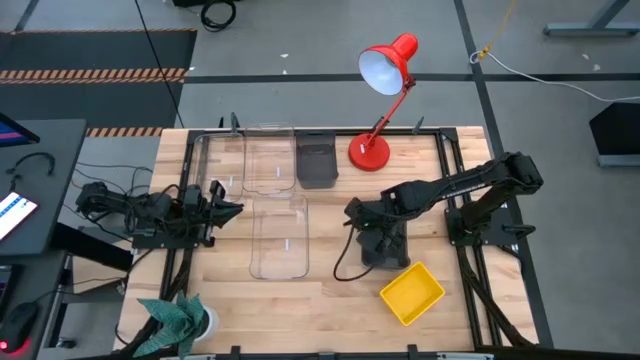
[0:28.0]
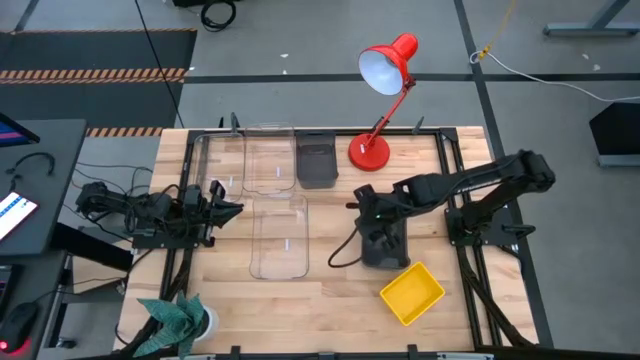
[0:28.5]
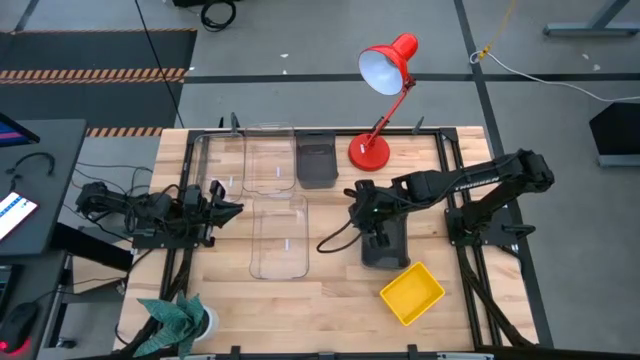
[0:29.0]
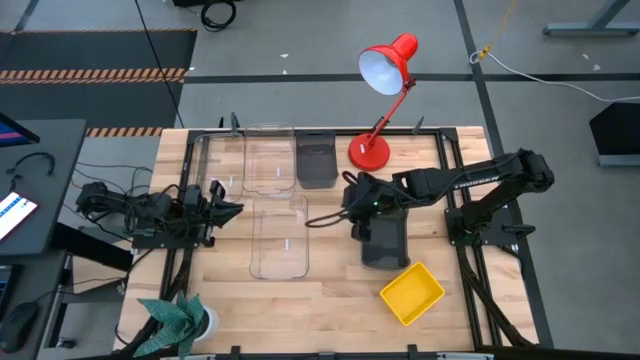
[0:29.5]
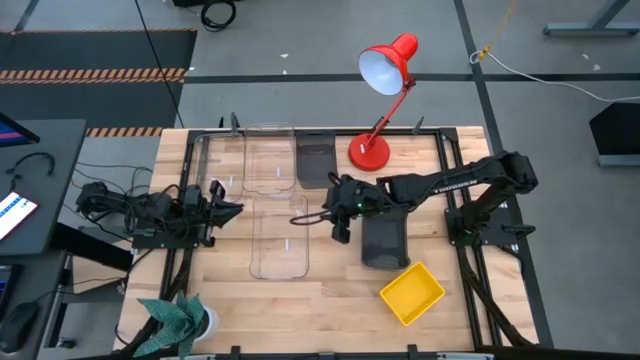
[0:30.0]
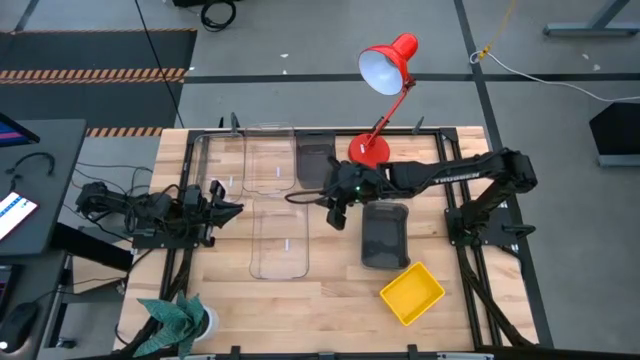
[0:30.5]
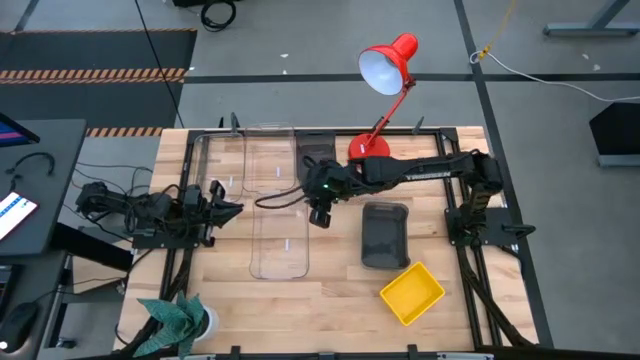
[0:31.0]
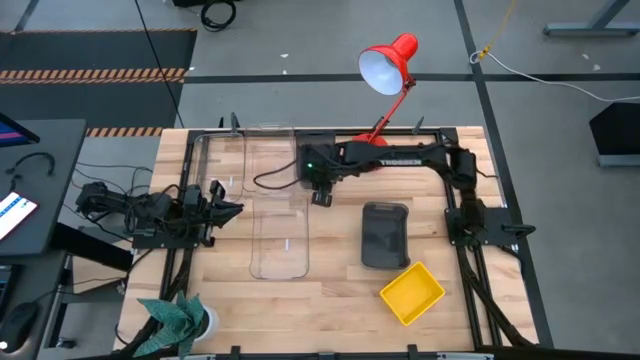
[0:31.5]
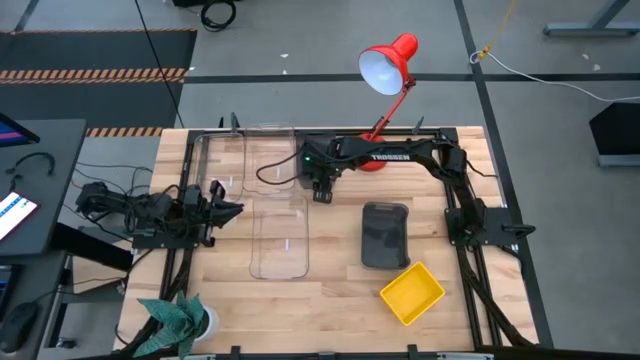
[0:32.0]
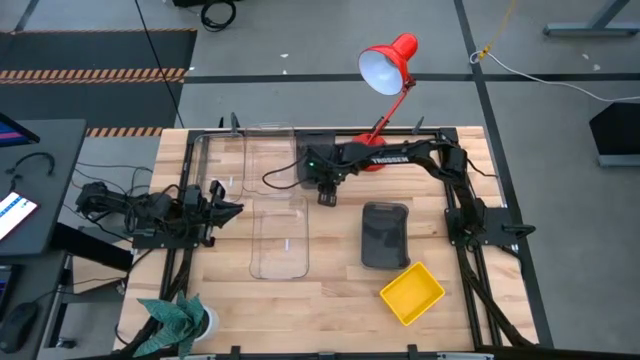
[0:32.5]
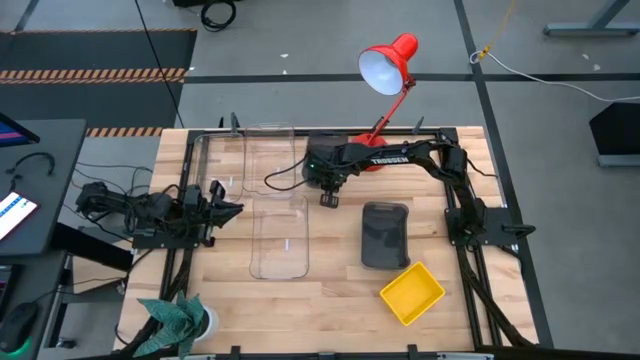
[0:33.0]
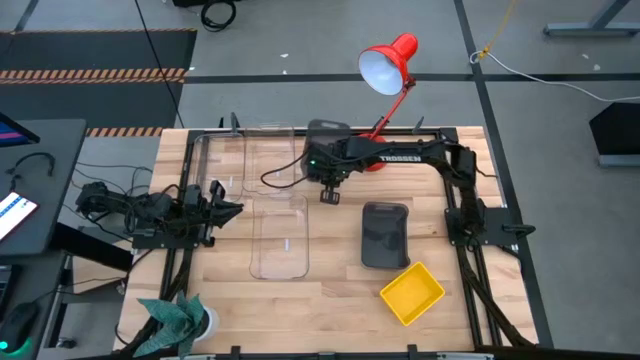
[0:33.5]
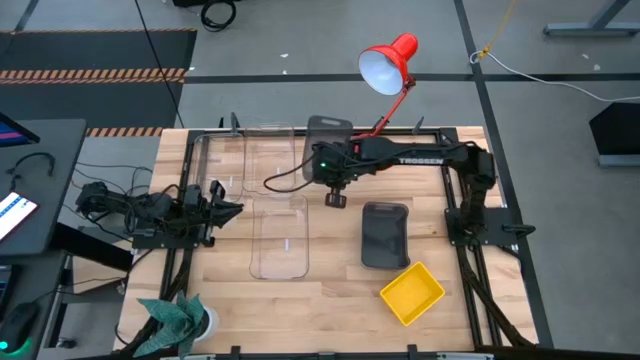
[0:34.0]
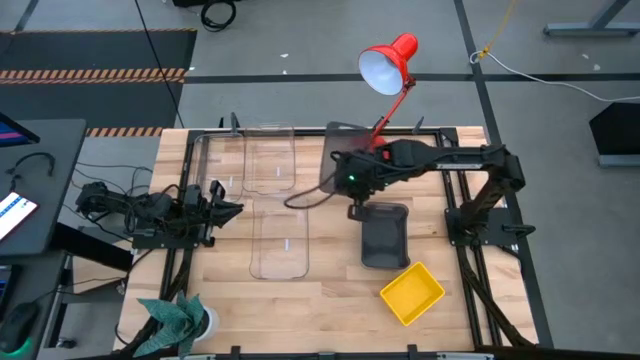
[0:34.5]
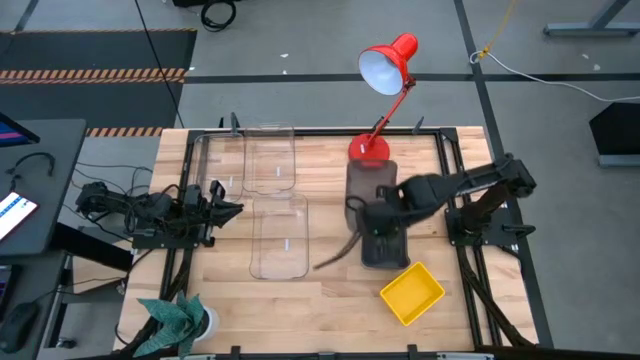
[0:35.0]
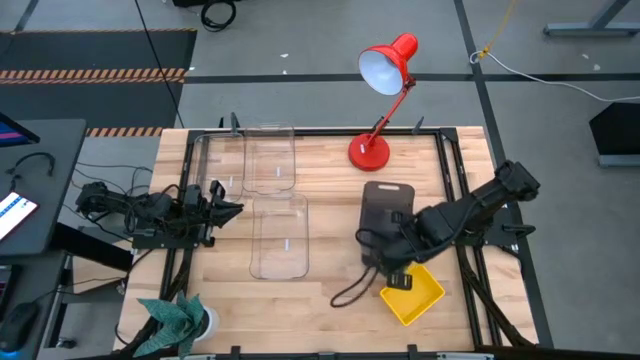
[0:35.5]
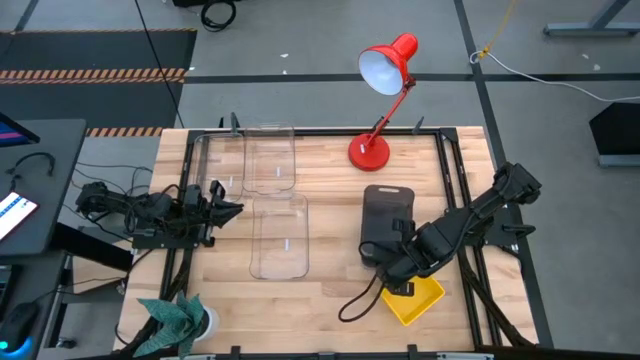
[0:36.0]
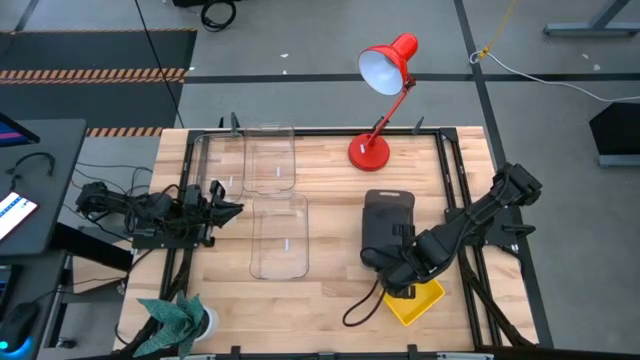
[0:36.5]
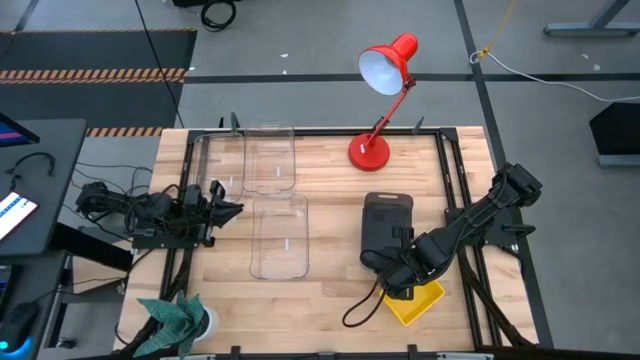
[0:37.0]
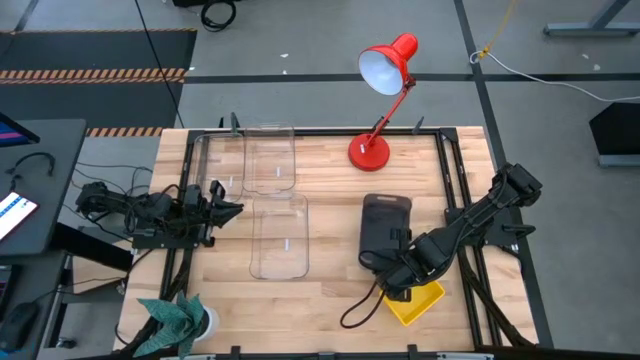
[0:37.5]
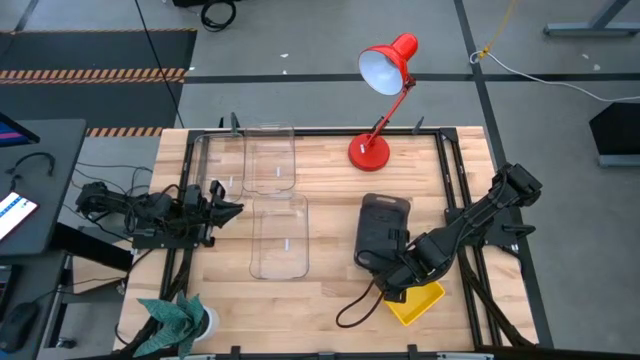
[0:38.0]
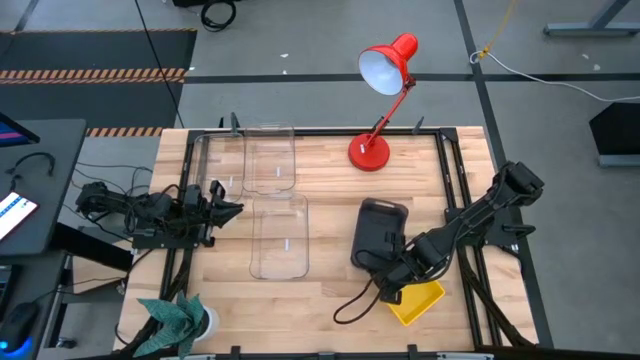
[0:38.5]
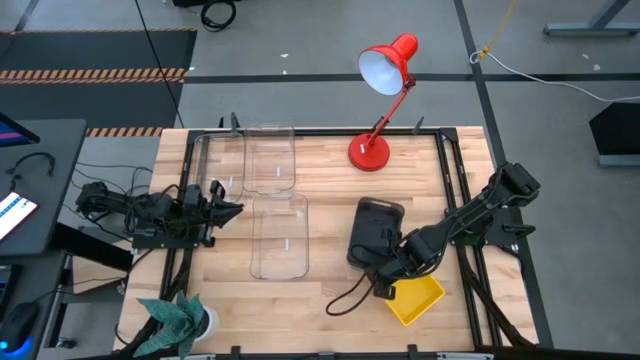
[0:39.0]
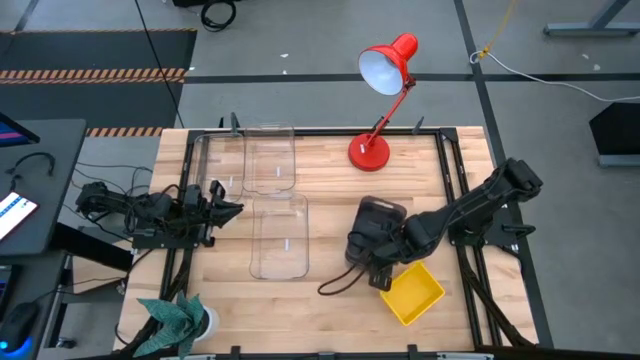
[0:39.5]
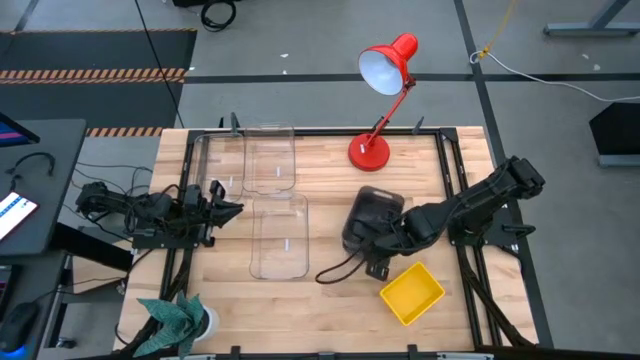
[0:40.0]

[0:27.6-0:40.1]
Stack the top black bin on top of the bottom black bins

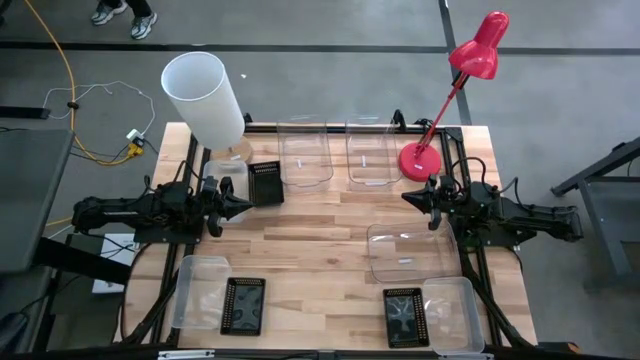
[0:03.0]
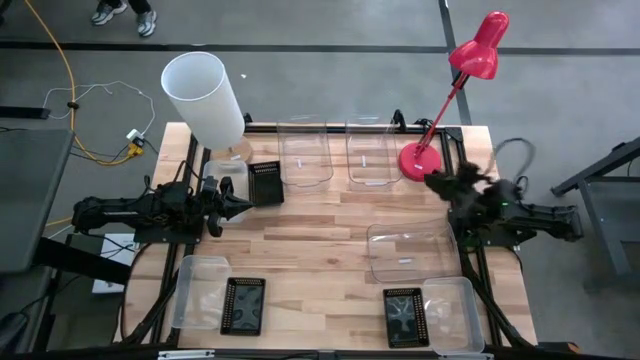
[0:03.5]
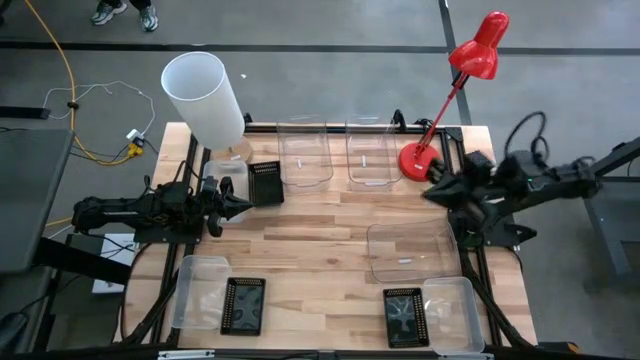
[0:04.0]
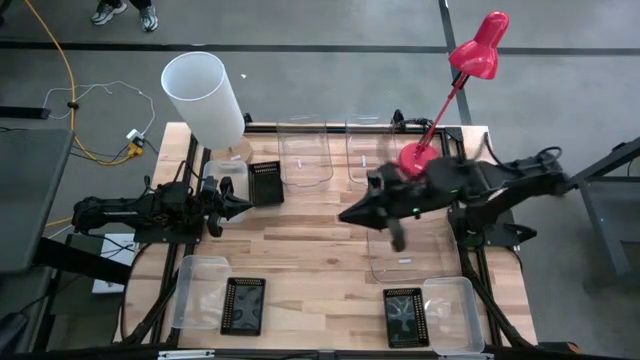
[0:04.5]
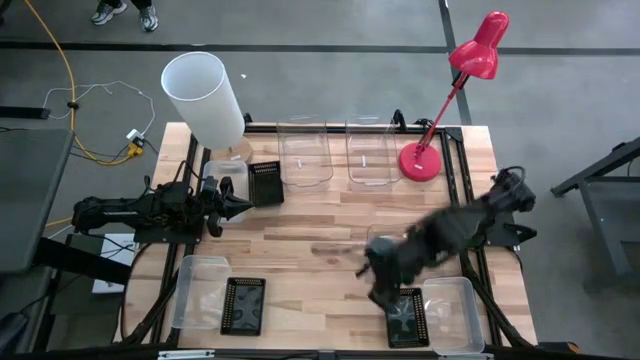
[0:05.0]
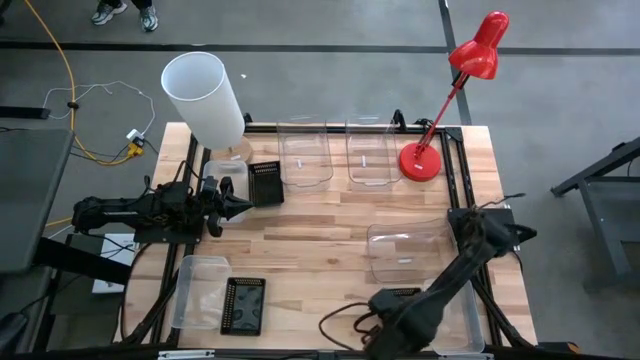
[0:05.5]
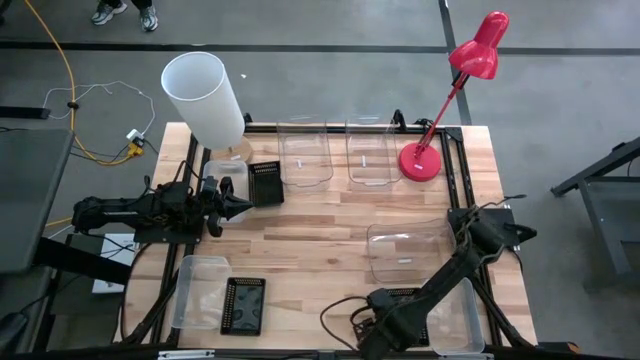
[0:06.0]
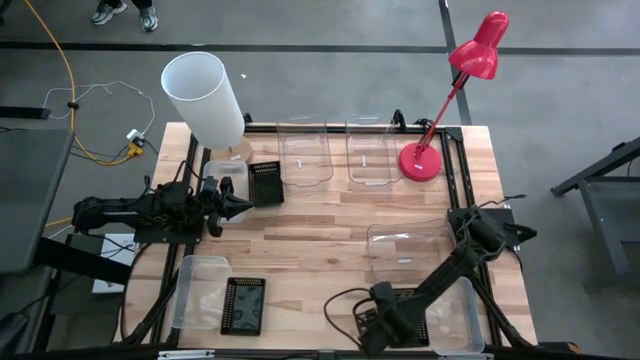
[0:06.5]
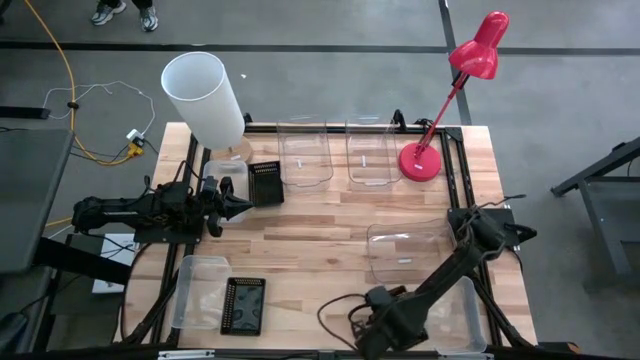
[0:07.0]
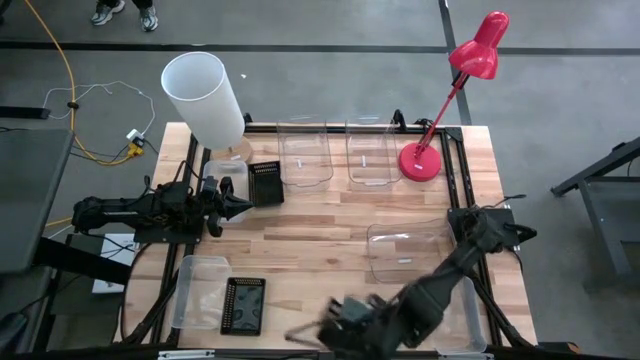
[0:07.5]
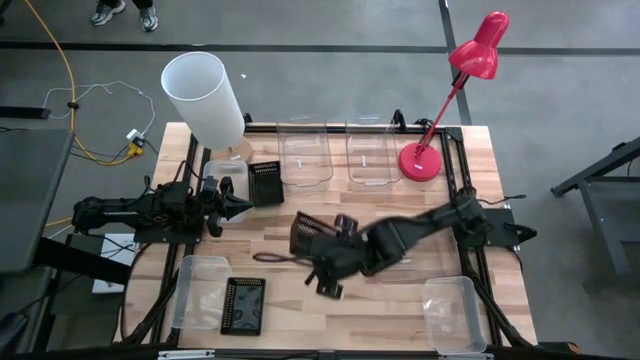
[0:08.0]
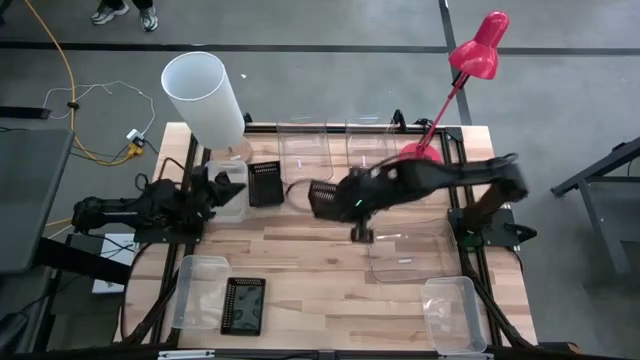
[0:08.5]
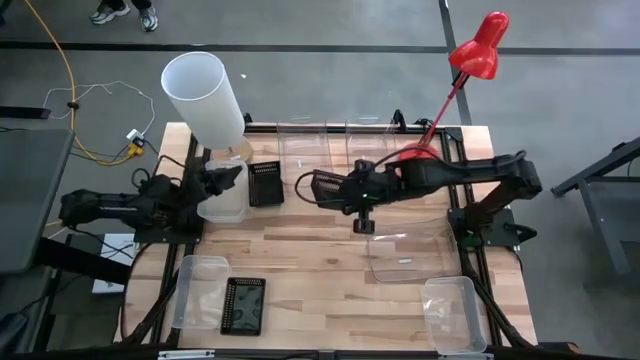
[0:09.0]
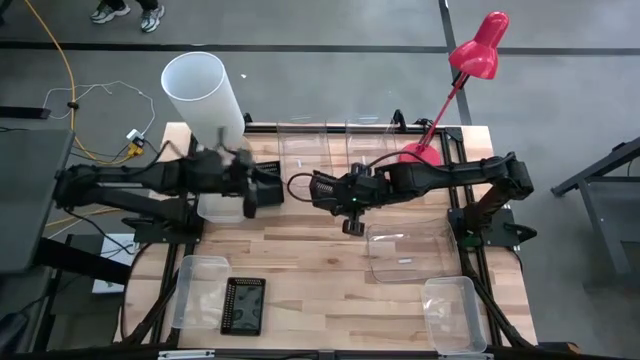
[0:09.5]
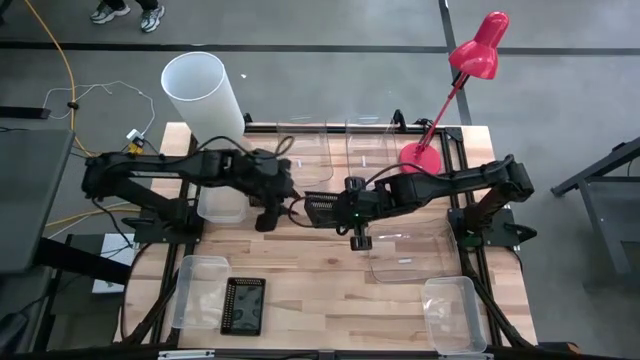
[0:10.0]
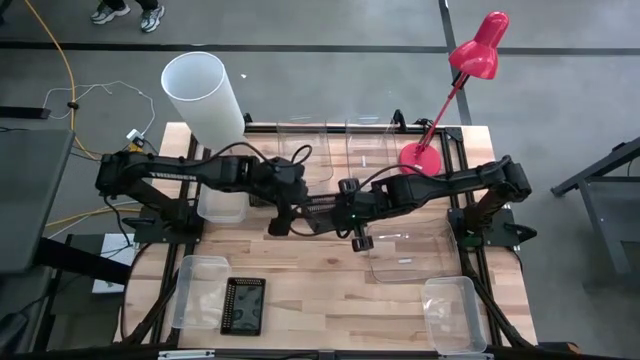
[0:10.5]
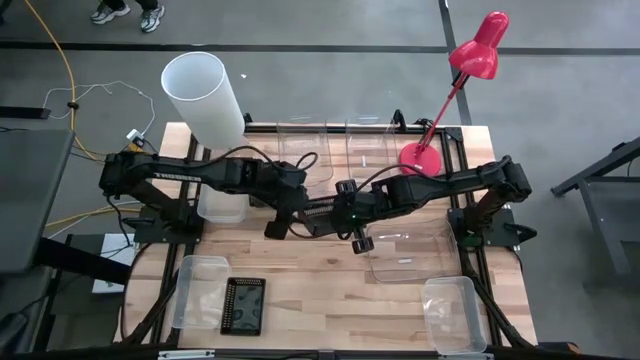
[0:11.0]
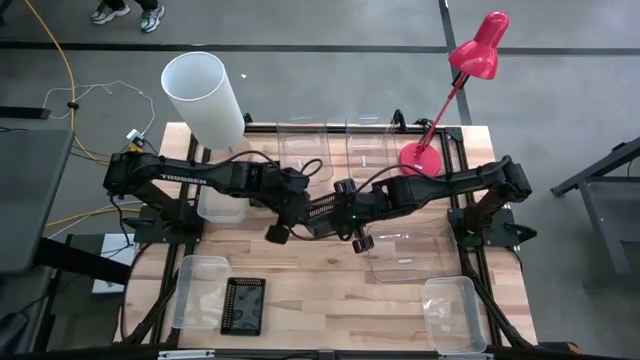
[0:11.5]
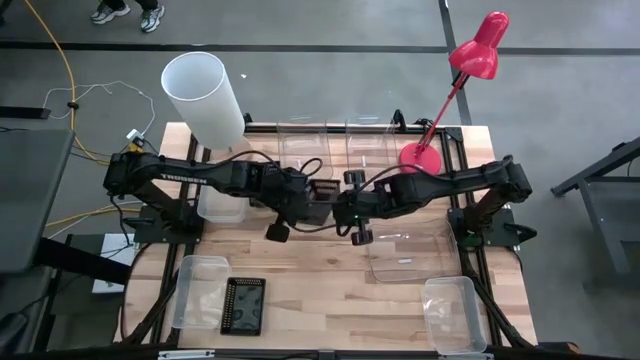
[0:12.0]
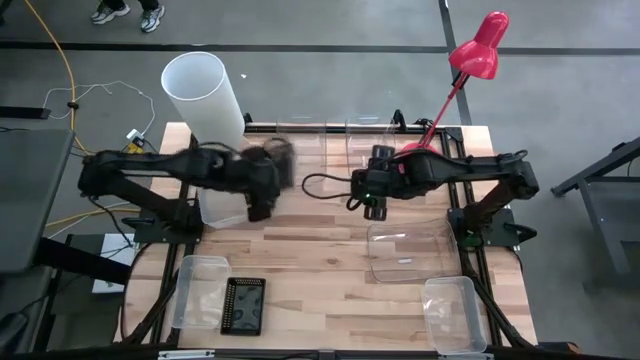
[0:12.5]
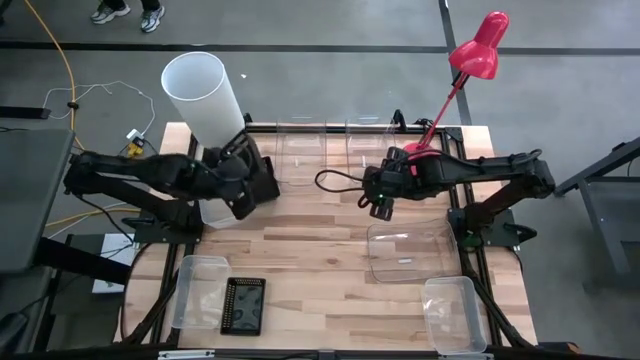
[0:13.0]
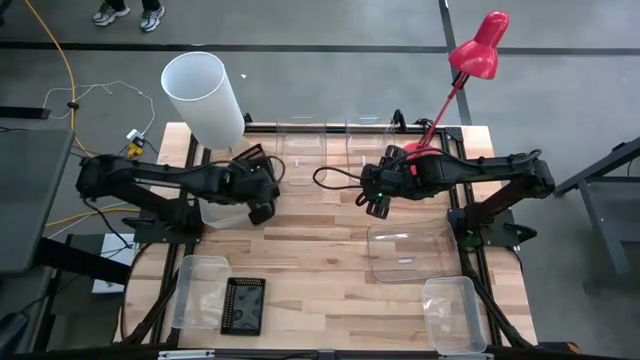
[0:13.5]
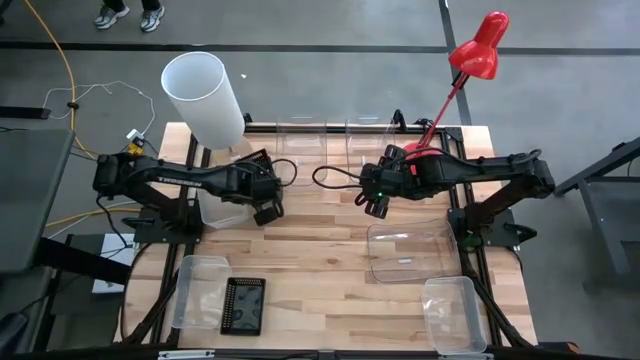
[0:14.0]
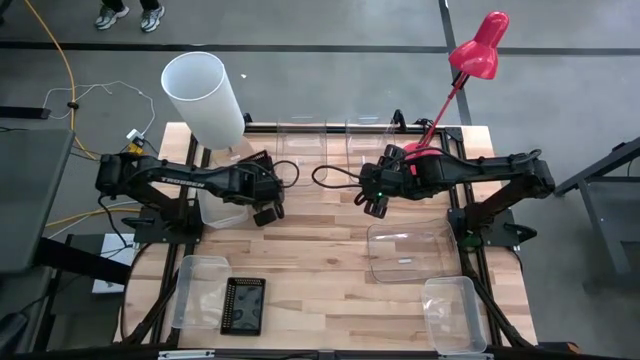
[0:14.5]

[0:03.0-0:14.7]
Stack the bottom right black bin on the top black bin
